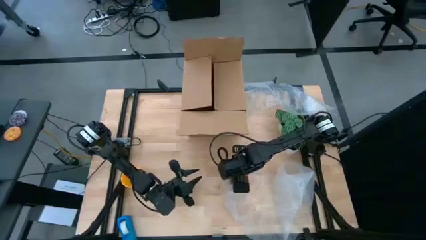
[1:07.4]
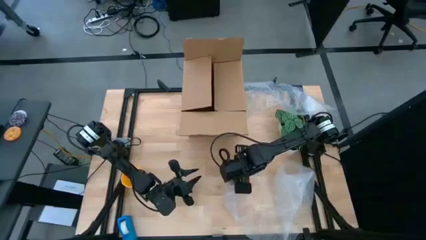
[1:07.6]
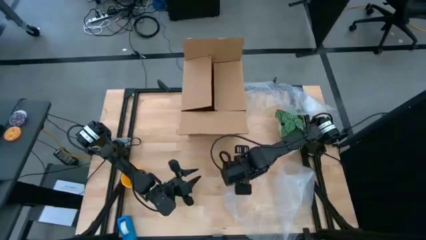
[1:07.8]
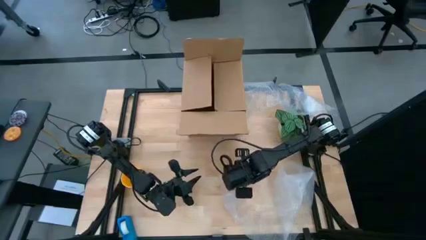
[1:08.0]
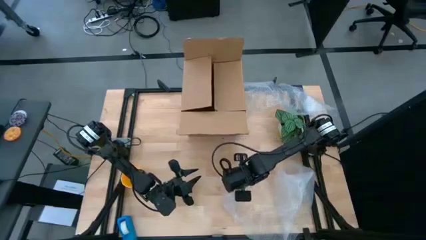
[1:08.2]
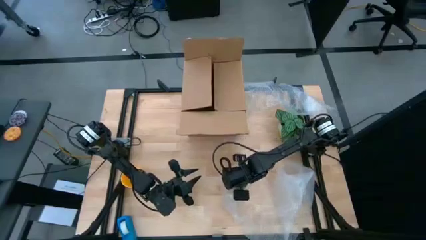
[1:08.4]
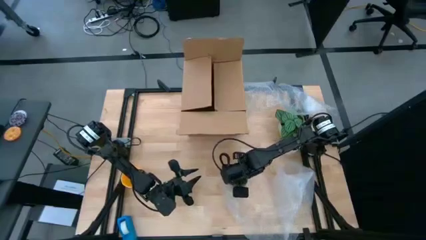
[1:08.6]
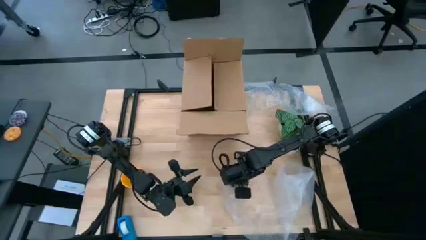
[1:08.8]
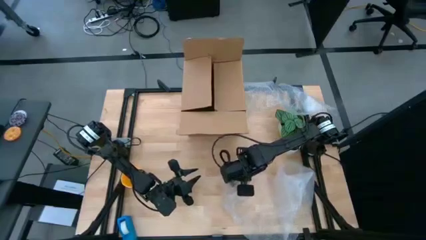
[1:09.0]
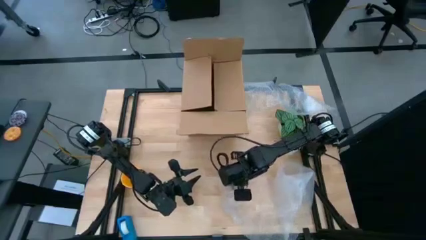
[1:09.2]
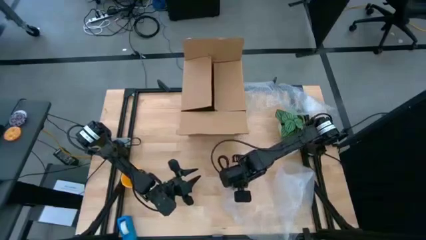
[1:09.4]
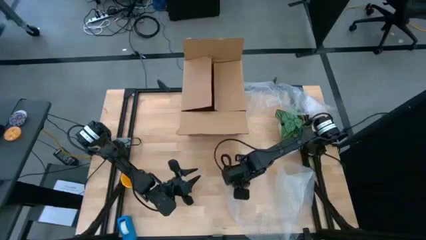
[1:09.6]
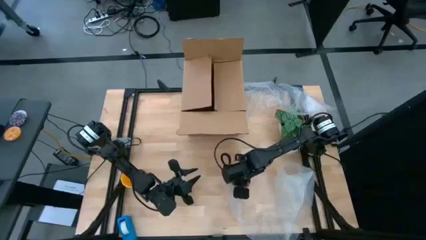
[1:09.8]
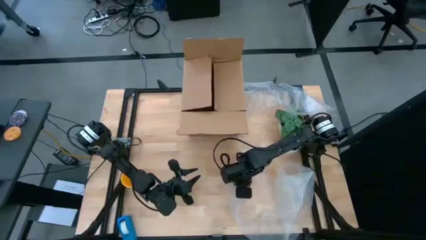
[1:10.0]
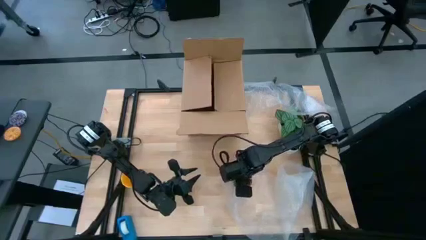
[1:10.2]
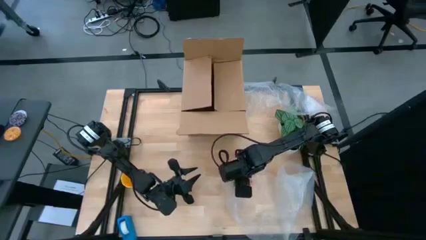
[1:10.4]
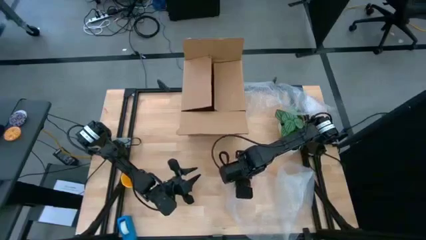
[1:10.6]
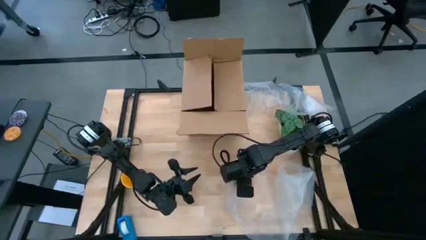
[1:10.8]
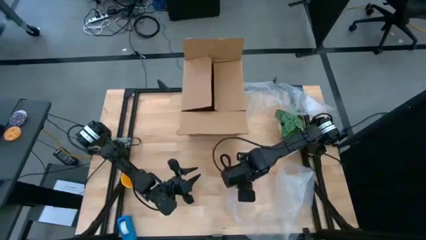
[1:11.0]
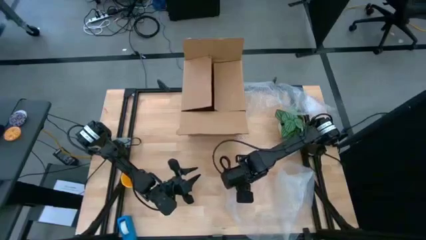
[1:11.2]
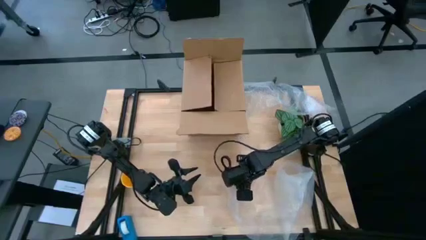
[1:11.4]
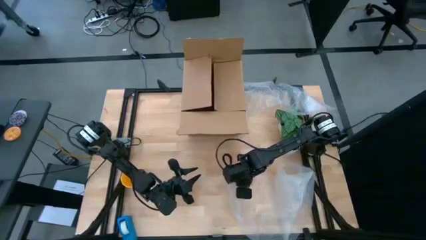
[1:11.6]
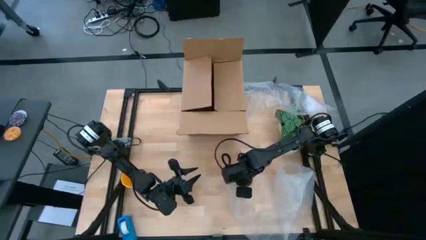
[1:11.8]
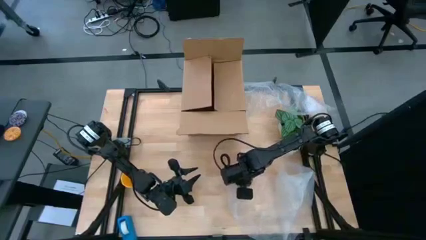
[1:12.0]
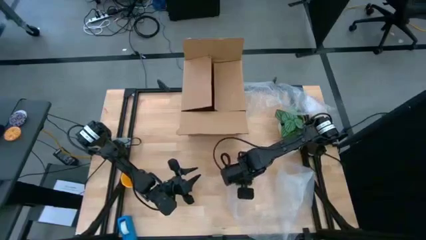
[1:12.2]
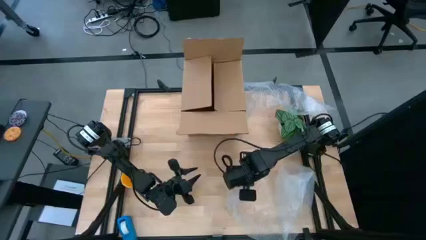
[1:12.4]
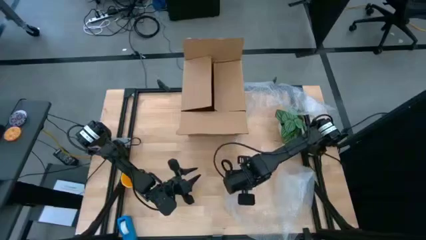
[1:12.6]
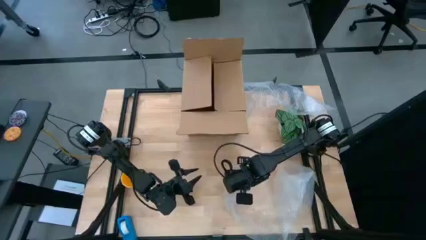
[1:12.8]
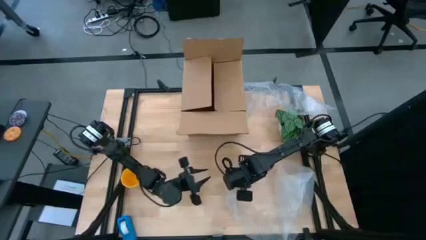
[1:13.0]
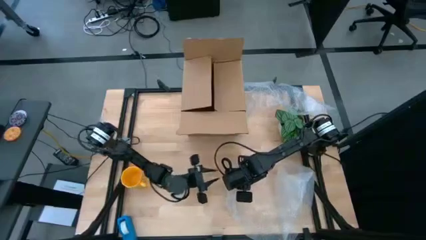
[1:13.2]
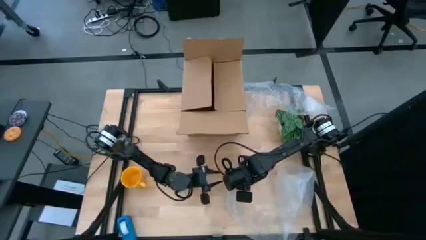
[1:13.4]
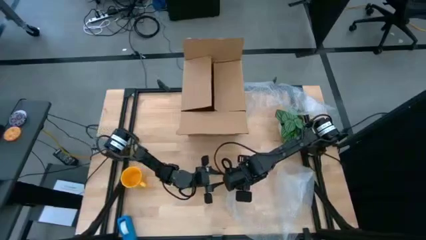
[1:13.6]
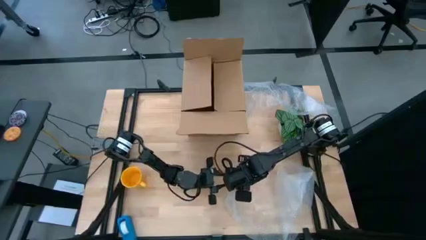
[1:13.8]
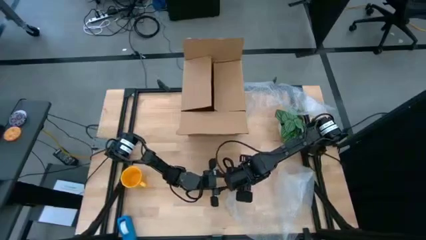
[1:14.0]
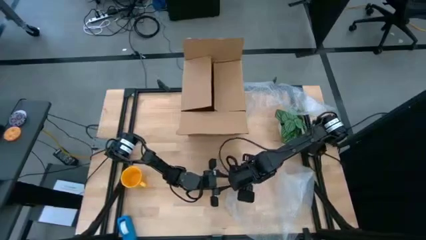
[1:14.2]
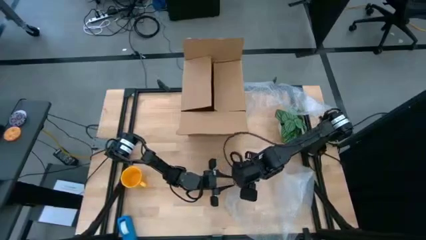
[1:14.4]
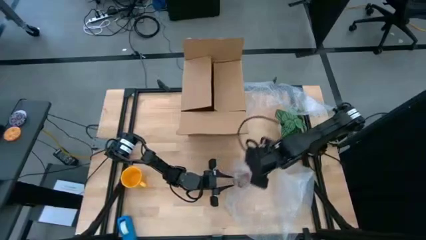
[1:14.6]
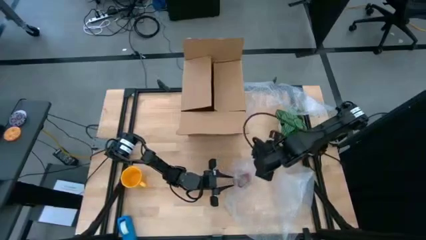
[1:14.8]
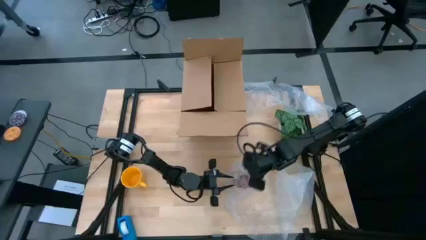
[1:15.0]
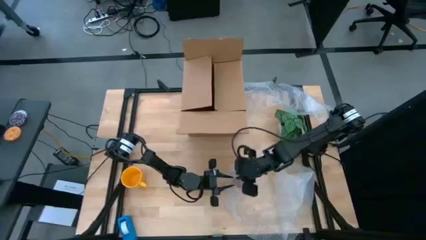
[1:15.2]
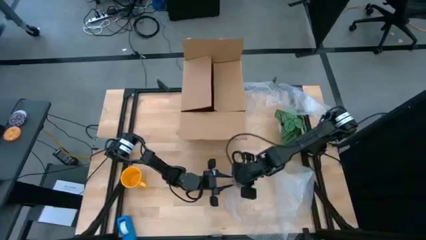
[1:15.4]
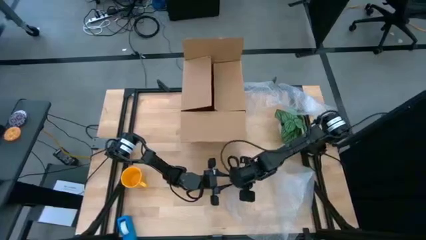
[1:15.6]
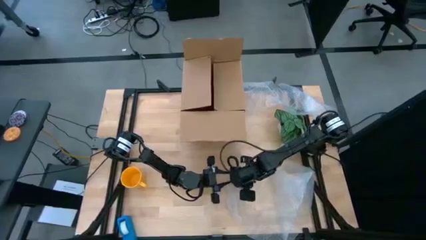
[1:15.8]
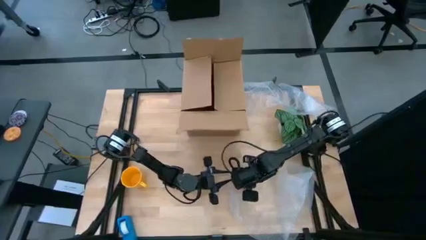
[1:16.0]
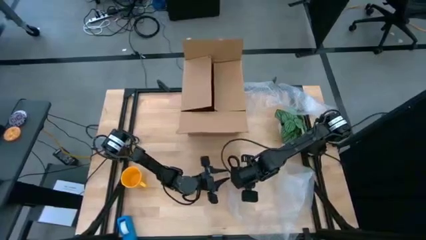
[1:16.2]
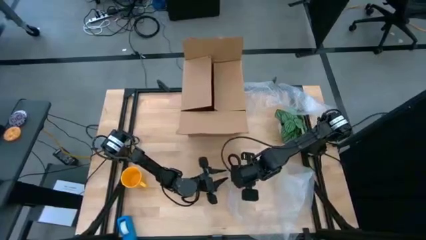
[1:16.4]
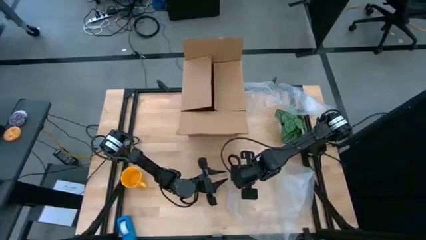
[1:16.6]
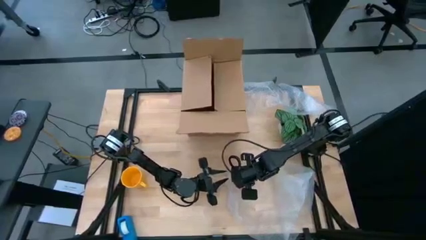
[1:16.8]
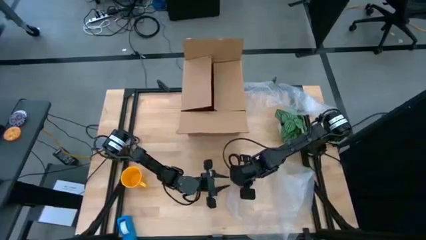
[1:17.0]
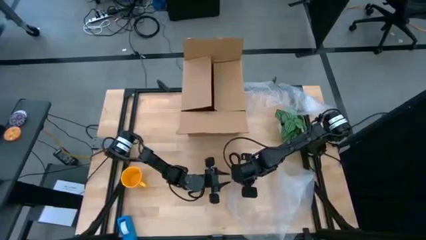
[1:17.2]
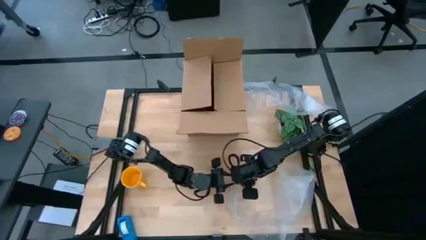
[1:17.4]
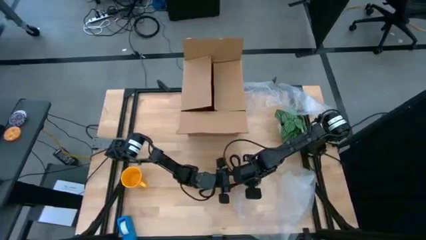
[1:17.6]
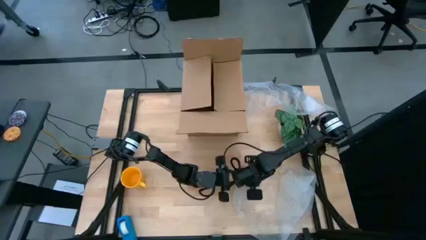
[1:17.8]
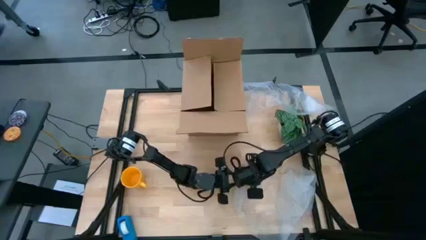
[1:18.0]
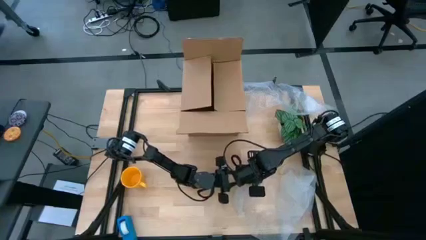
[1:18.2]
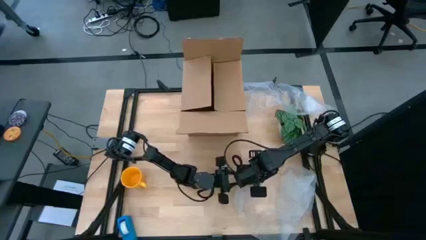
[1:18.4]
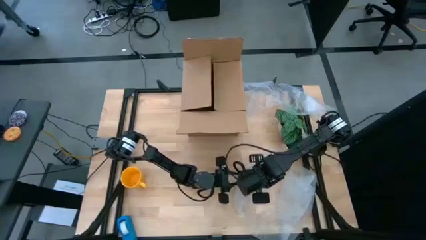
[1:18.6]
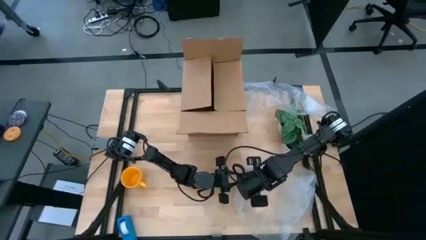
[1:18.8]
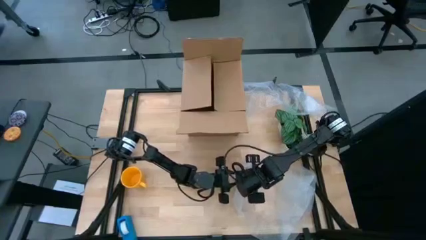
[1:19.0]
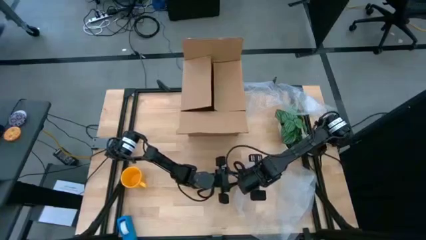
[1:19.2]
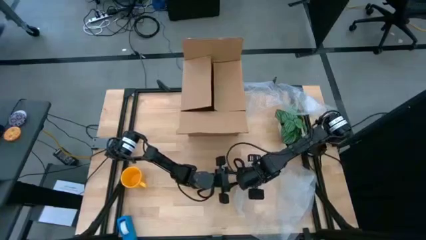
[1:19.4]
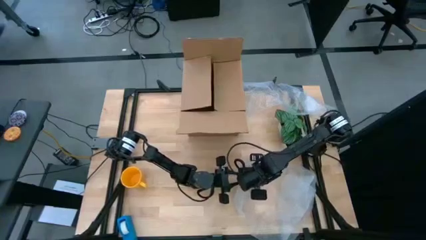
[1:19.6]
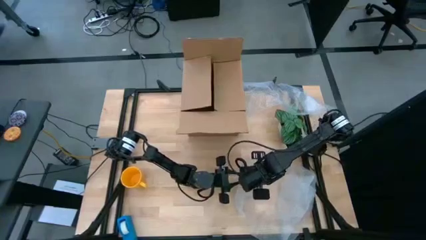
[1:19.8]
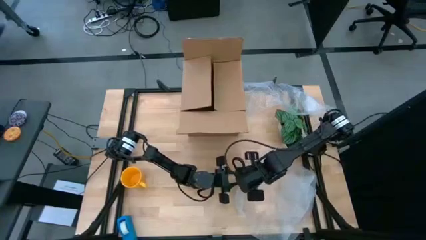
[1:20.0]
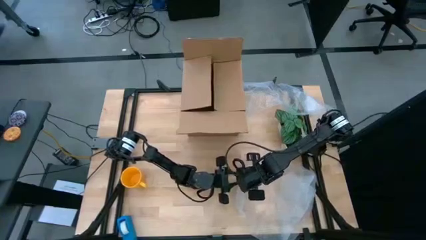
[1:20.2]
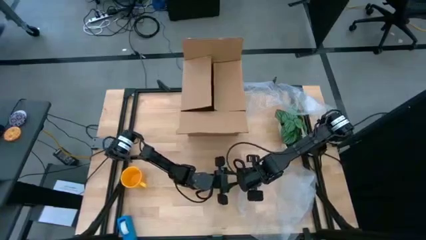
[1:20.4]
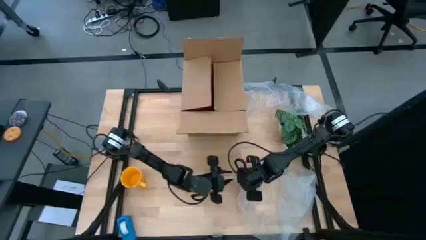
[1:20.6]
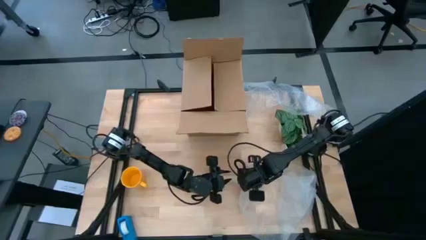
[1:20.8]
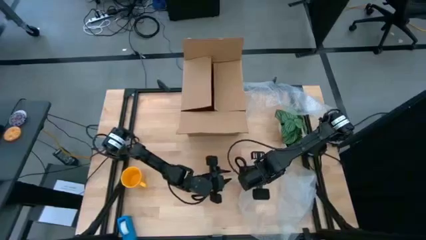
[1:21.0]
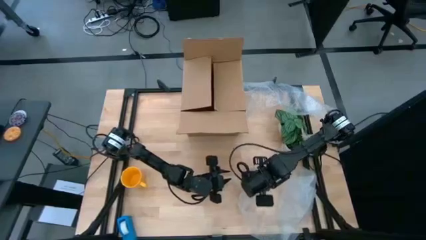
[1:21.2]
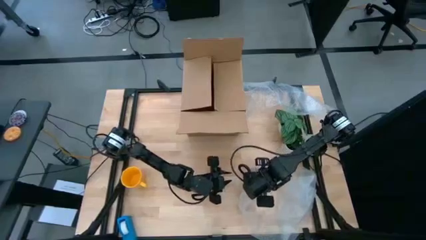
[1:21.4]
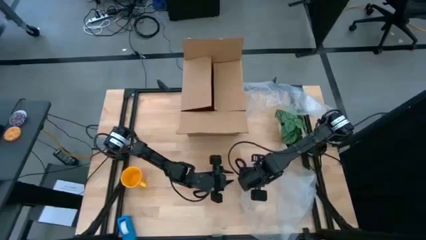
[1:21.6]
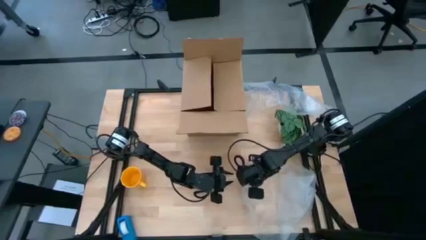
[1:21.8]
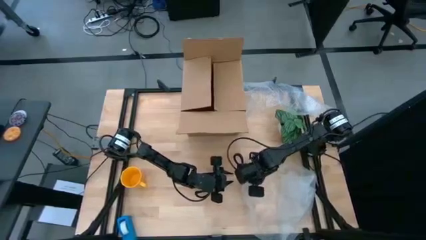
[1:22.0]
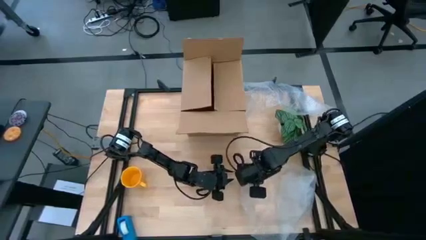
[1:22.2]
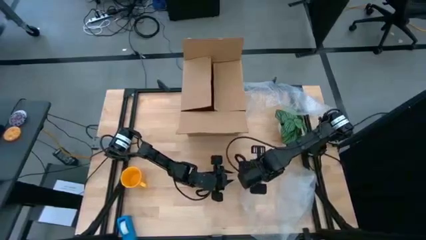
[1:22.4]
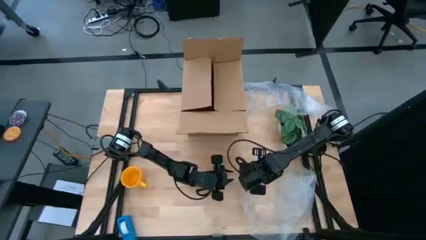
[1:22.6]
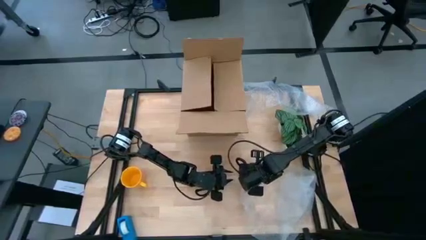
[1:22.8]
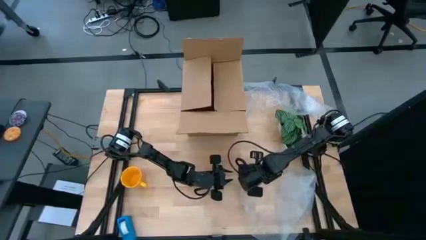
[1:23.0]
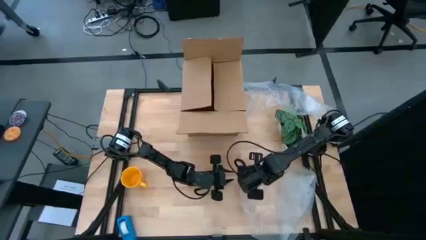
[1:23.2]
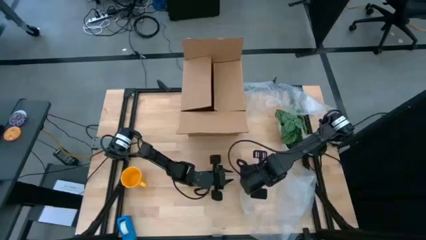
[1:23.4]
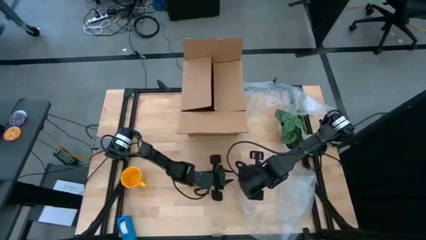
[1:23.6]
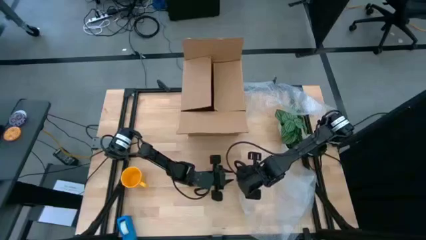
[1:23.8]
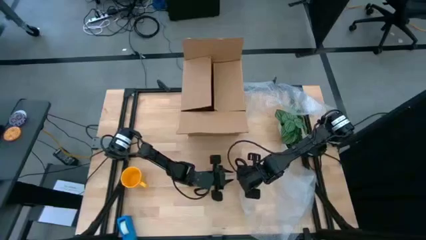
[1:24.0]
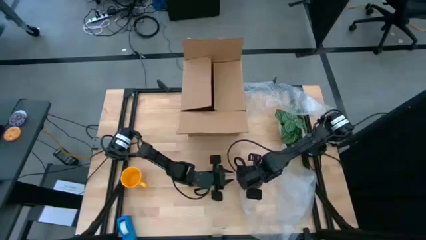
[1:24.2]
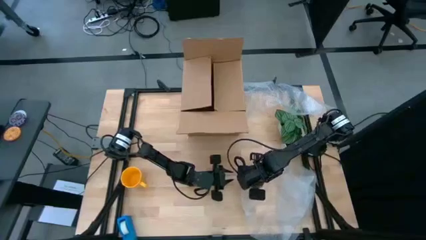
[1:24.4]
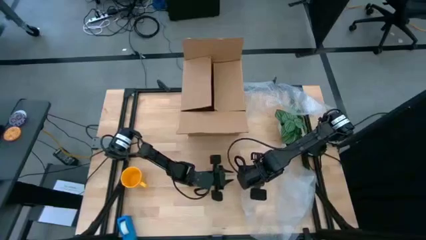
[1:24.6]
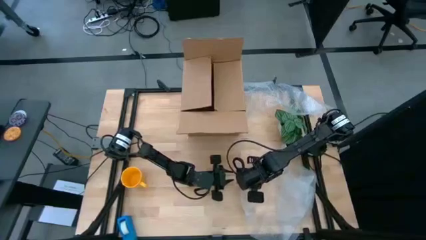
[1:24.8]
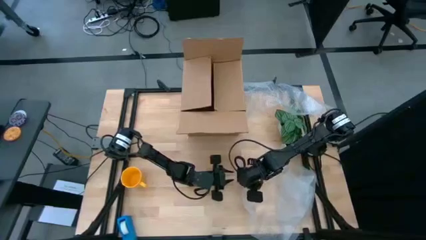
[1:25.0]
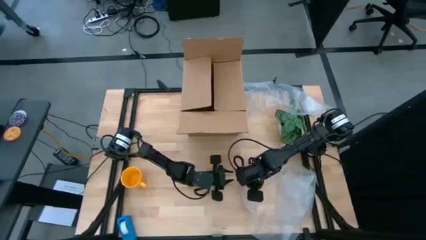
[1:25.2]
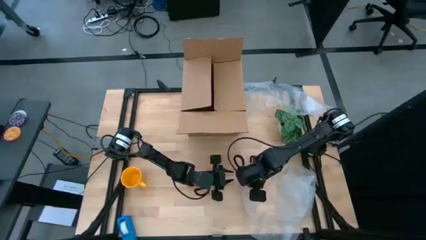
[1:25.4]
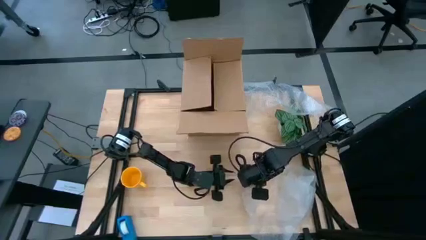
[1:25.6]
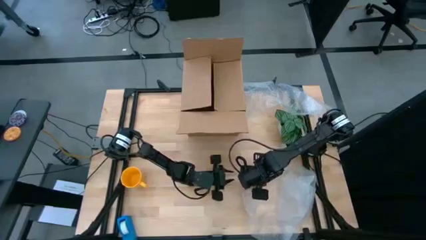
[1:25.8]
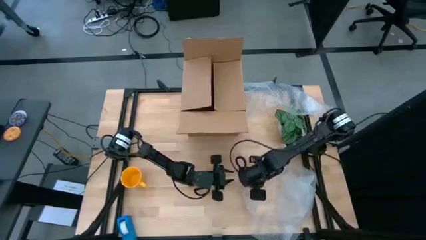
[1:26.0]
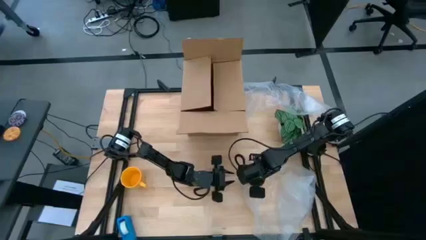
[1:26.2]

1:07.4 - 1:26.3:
Task: wrap mug
Wrap the orange cup with the bubble wrap
